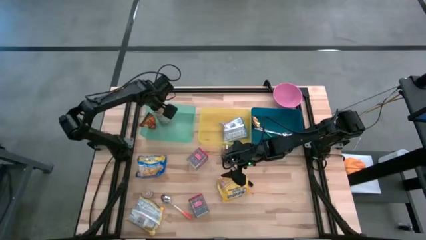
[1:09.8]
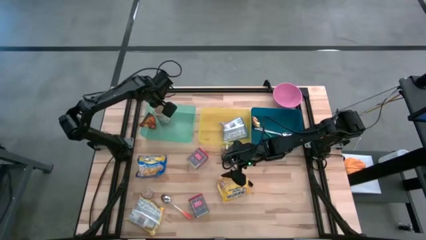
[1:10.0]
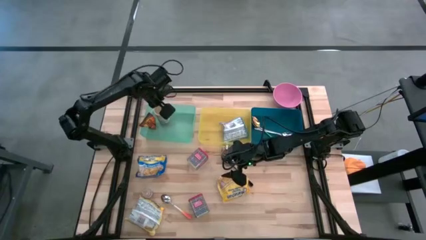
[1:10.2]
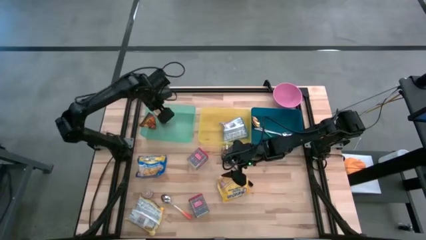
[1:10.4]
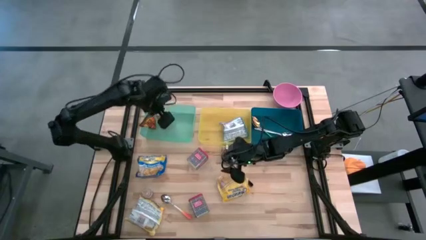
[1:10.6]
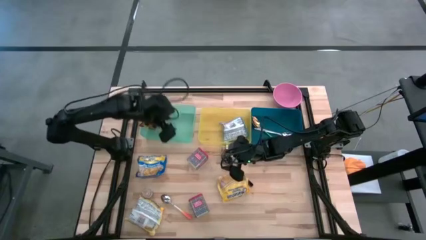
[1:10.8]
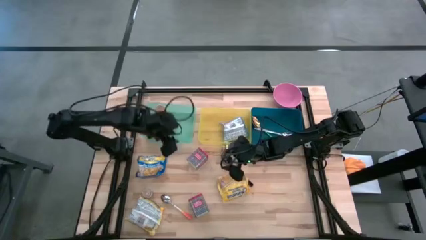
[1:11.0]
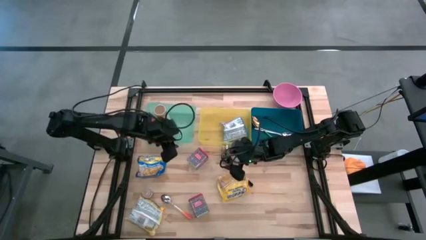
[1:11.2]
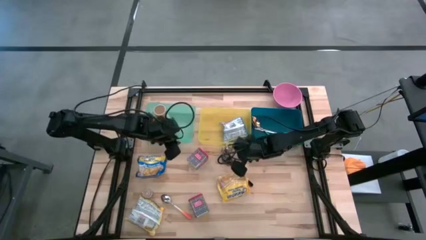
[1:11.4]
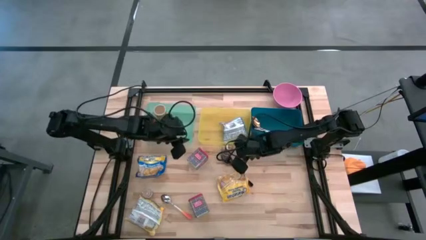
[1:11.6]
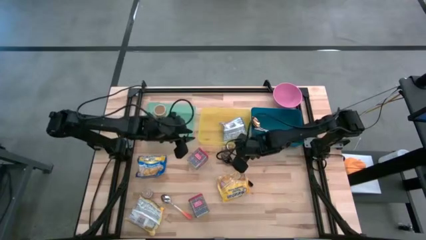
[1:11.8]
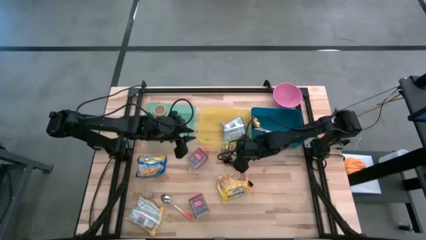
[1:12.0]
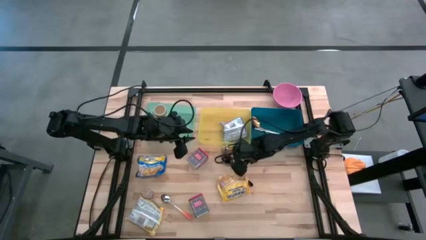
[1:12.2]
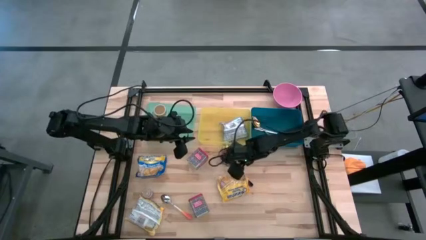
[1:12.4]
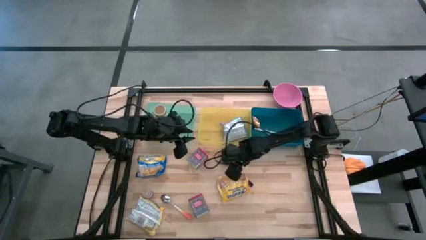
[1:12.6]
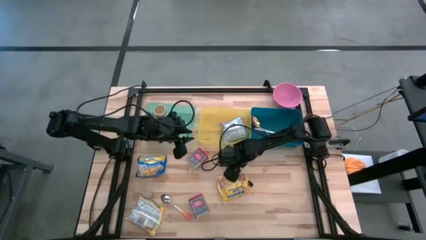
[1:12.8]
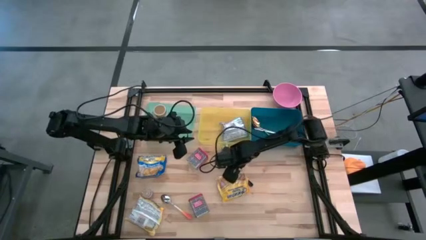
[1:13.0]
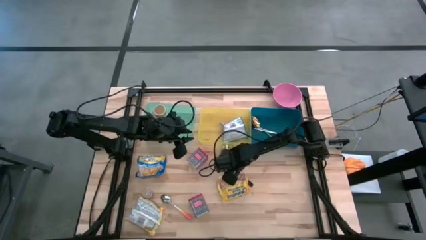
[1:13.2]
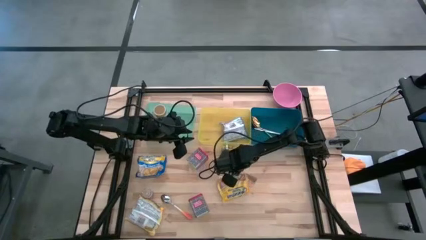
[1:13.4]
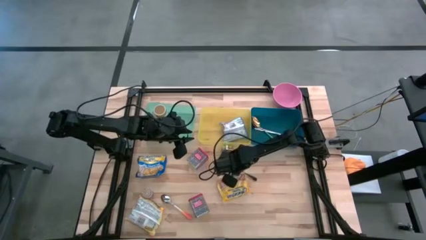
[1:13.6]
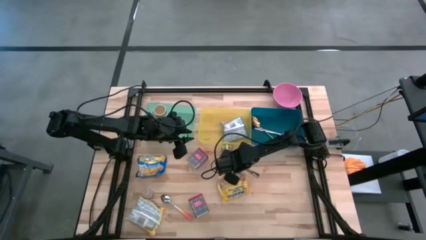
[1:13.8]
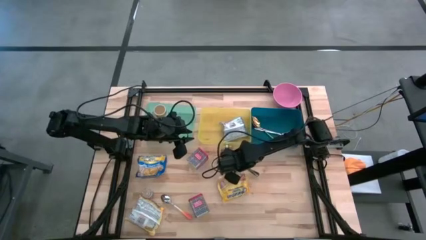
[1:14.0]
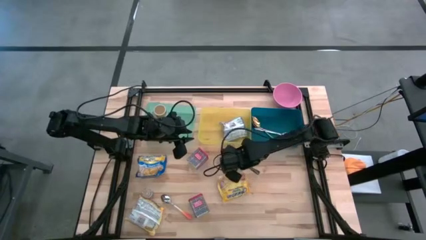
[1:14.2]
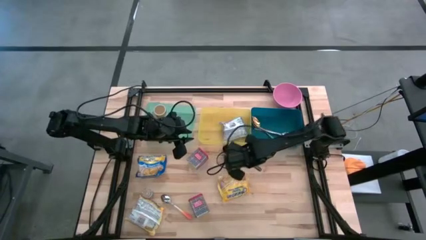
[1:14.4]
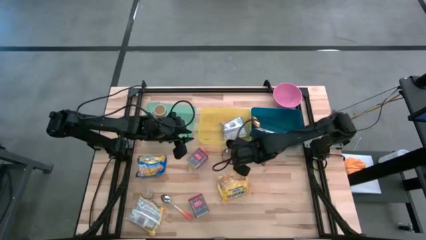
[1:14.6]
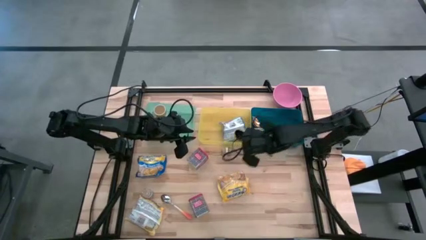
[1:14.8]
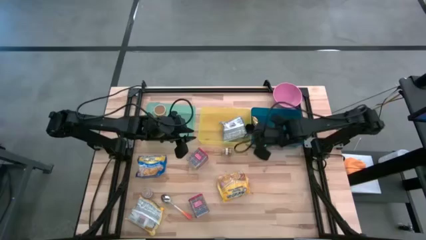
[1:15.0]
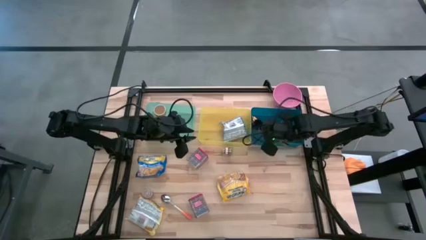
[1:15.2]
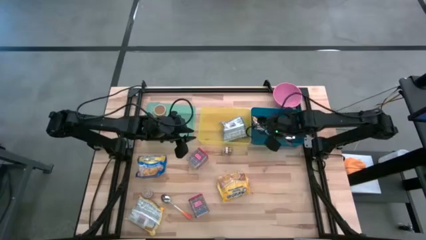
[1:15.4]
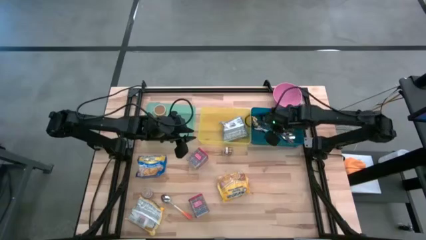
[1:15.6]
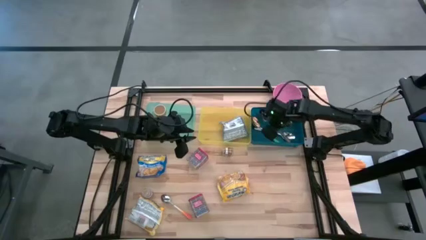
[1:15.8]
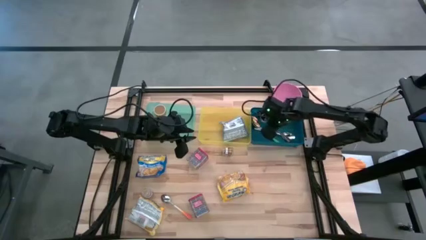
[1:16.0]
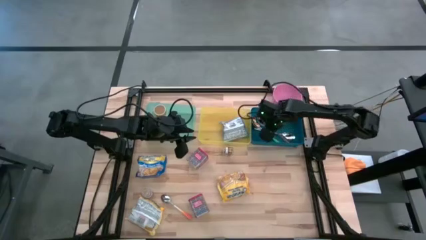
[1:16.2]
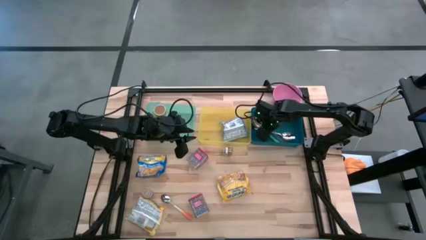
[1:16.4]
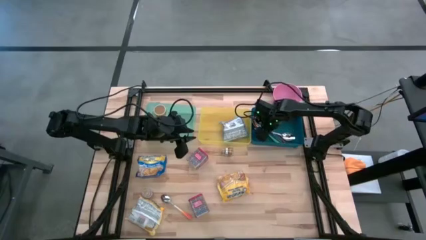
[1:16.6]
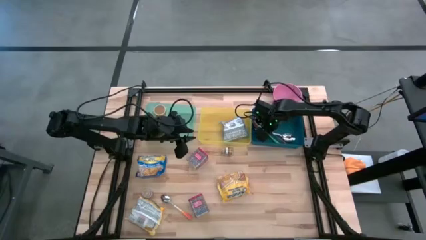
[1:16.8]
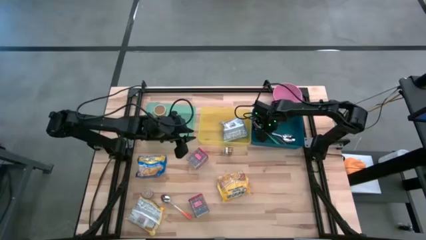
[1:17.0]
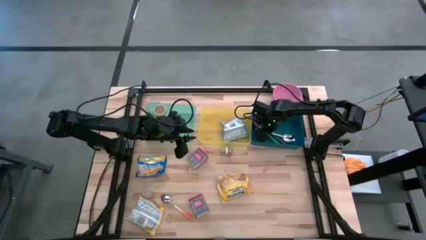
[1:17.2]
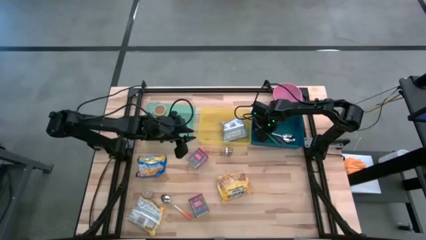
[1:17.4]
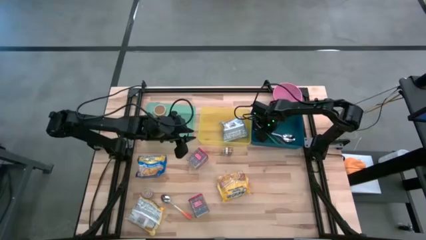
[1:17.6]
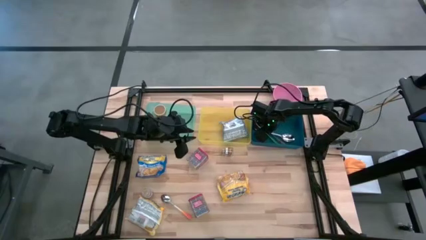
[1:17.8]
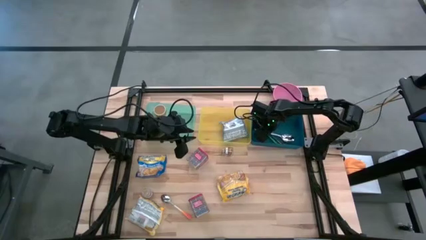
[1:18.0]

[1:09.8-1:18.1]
Put the black spoon into the blue bin

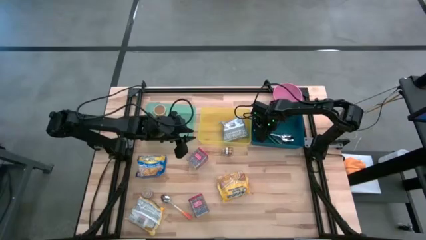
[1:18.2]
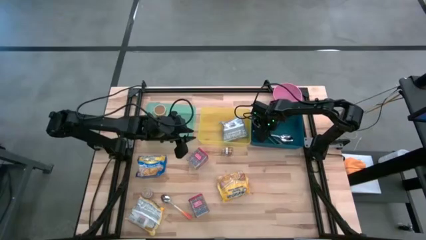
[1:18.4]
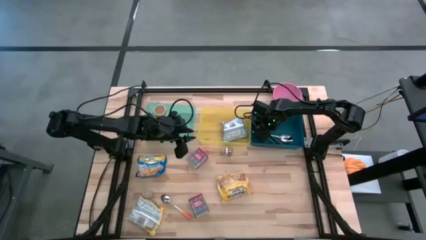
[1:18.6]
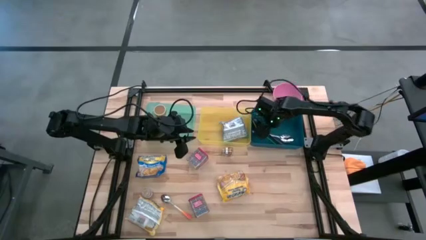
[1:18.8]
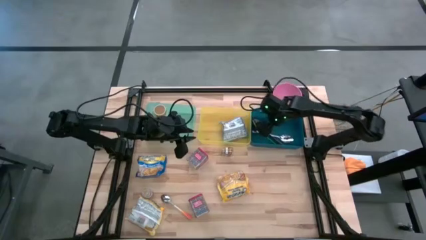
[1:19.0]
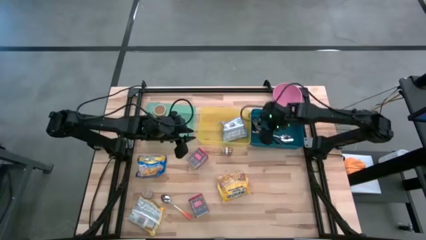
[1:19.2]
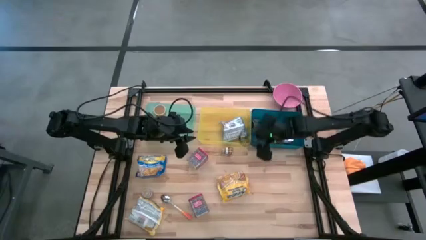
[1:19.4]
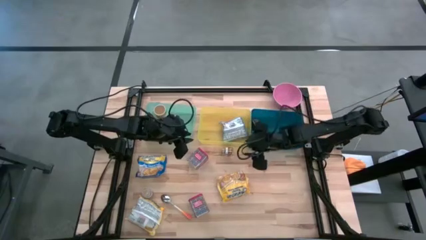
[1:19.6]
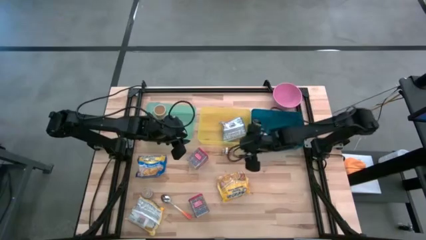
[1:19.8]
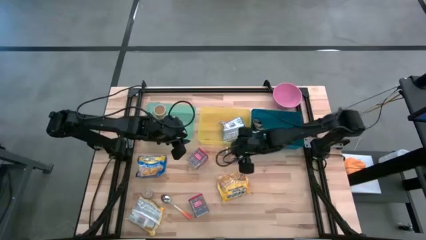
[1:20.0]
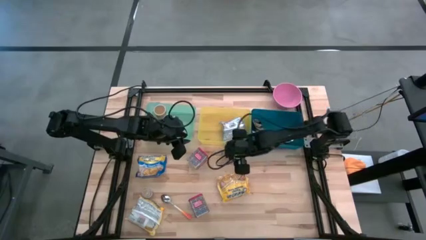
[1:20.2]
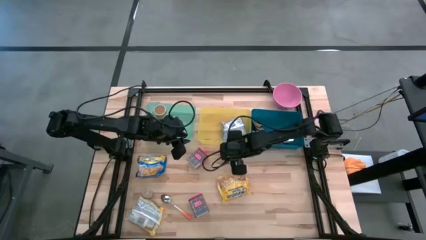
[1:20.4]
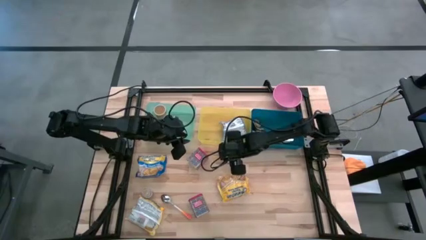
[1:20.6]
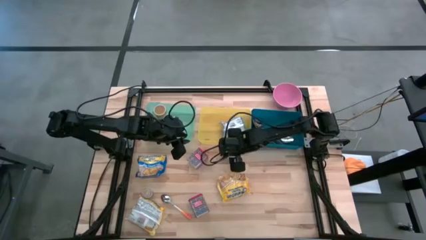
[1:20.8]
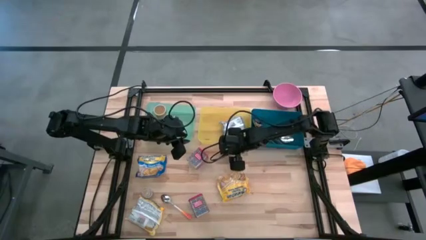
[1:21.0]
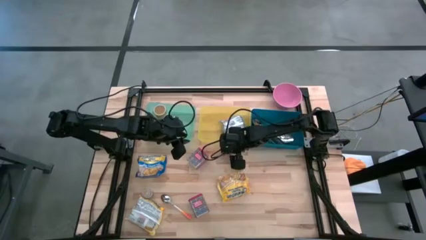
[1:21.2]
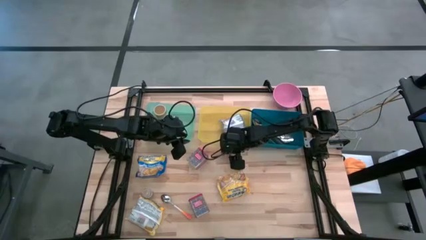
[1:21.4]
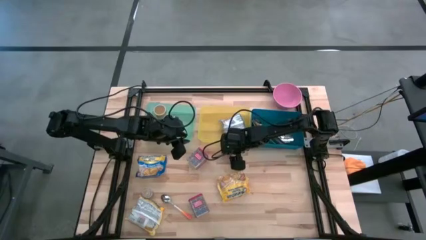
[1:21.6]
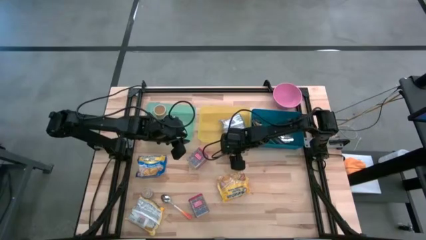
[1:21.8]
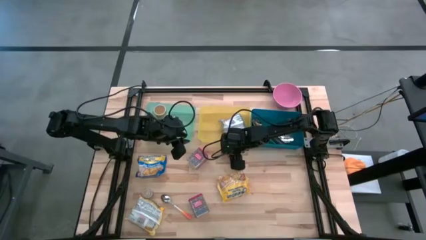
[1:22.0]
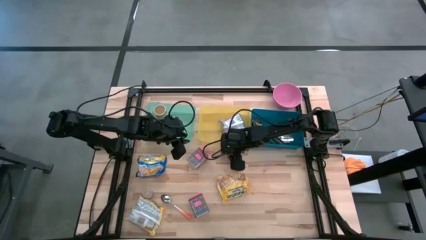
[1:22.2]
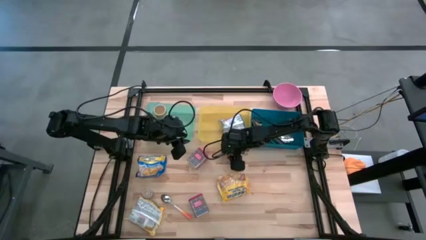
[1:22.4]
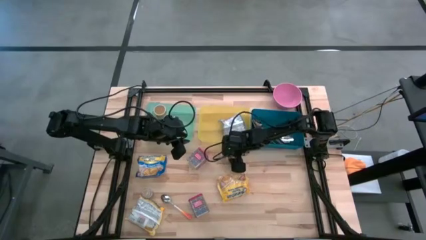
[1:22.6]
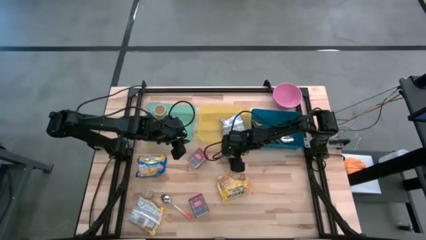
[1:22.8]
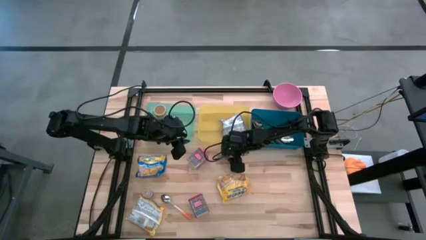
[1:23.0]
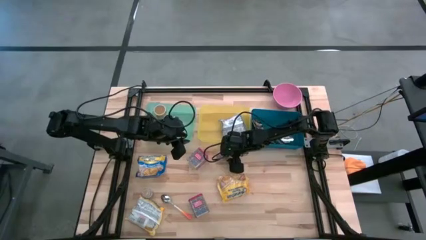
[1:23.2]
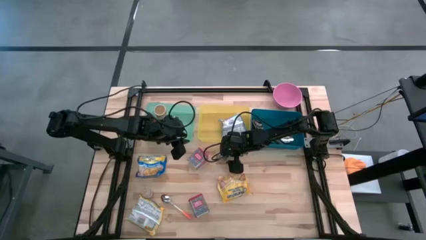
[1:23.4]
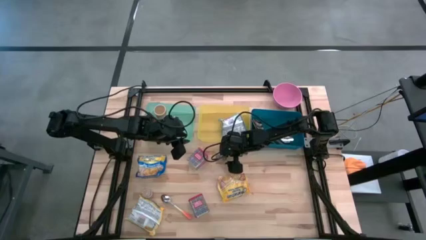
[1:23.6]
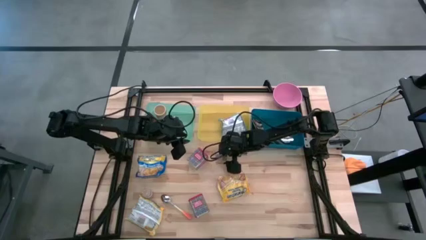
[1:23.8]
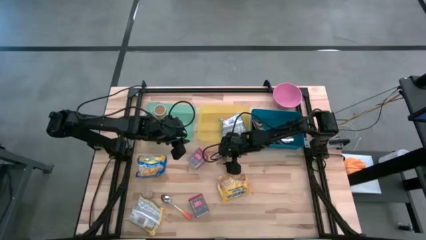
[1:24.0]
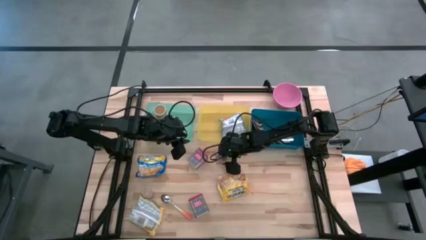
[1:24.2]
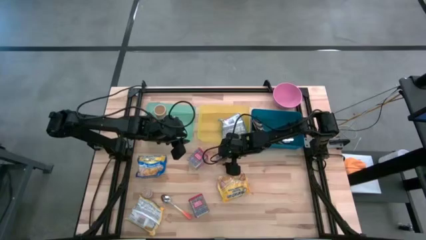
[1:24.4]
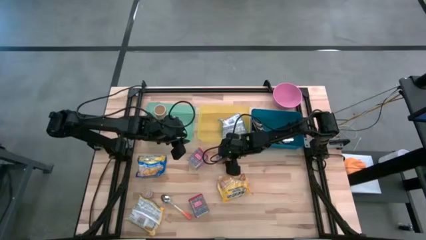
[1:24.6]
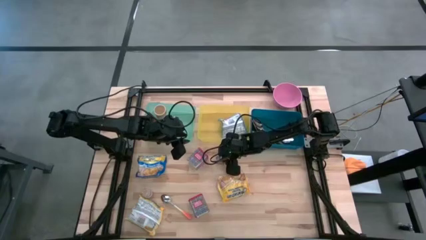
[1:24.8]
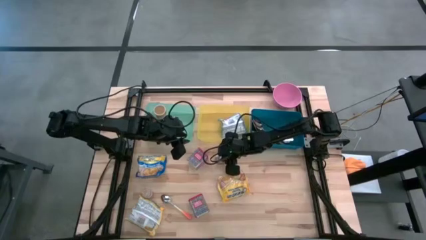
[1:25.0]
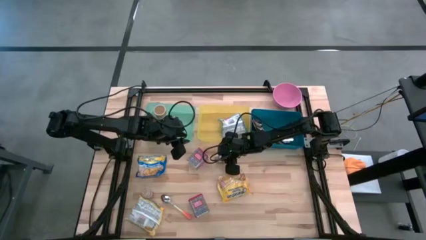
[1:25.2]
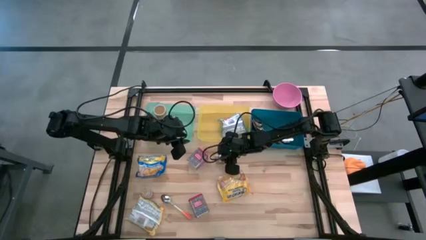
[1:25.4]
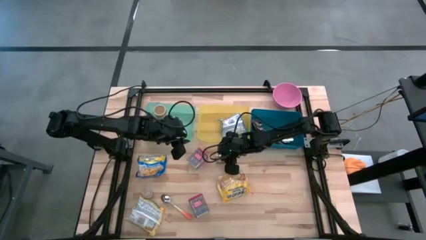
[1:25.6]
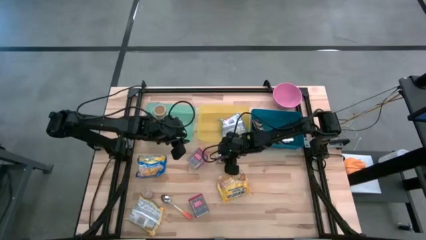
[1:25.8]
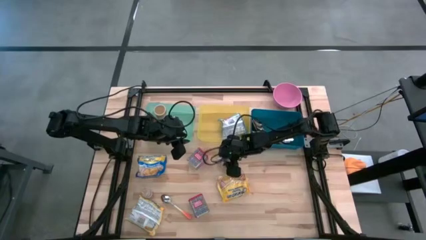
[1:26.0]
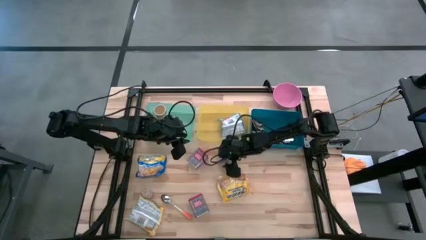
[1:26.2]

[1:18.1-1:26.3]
Put the brown seasoning bottle into the green bin
